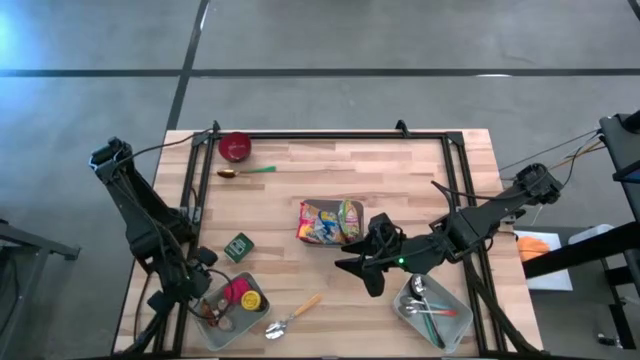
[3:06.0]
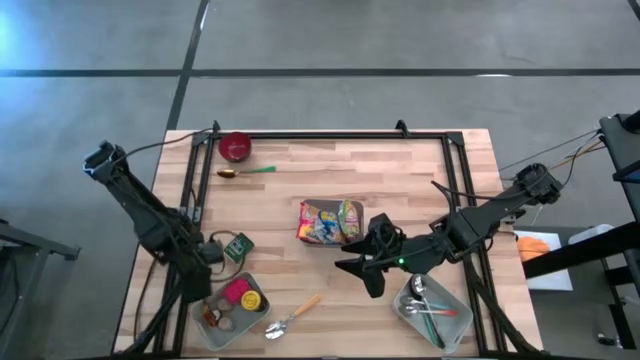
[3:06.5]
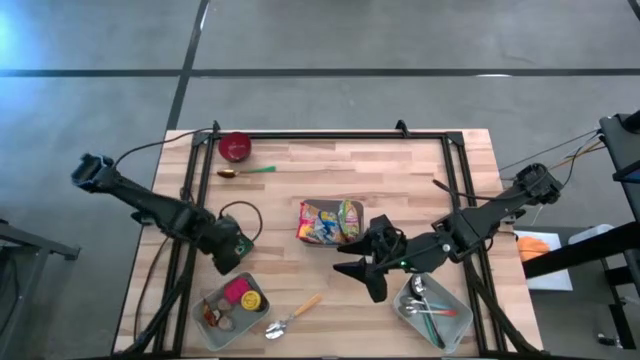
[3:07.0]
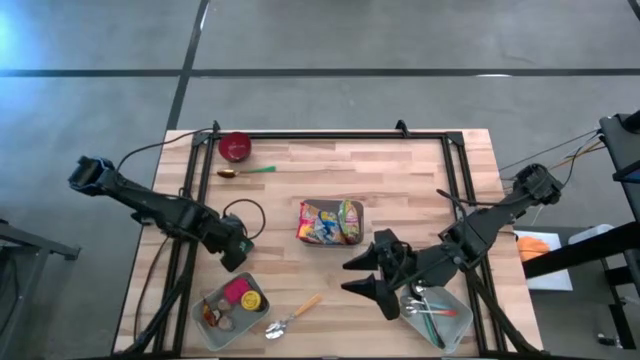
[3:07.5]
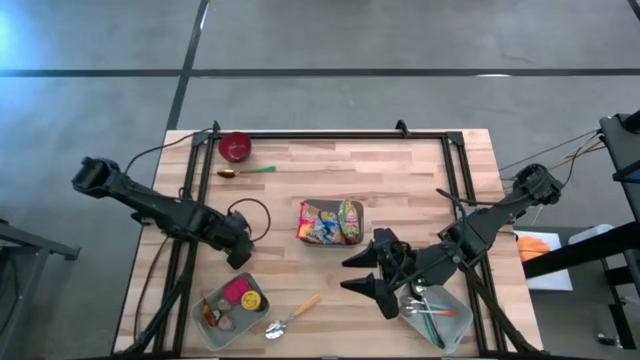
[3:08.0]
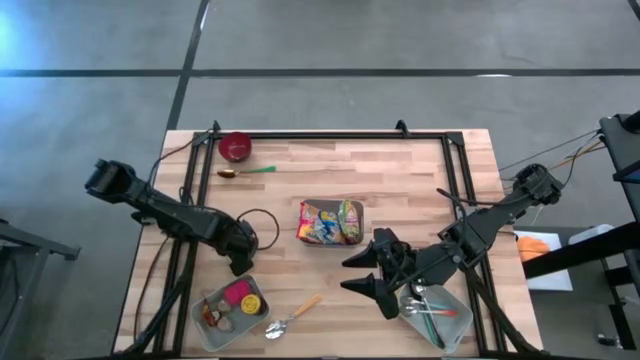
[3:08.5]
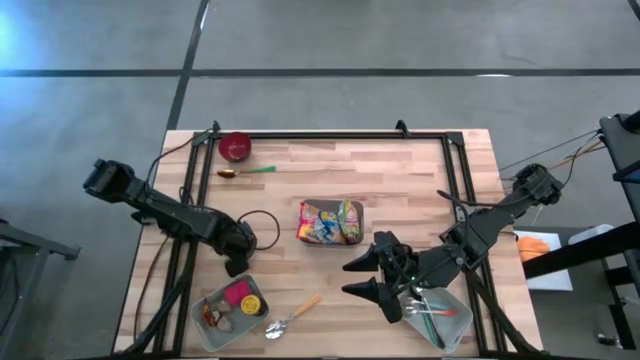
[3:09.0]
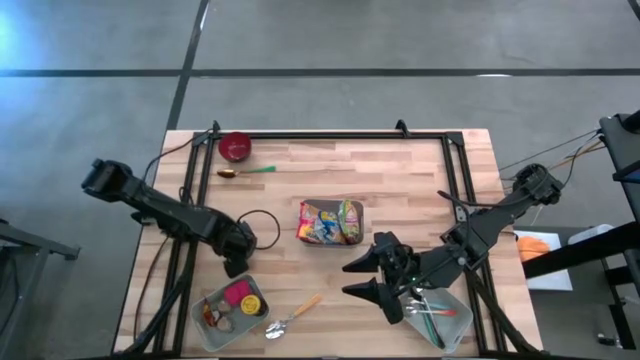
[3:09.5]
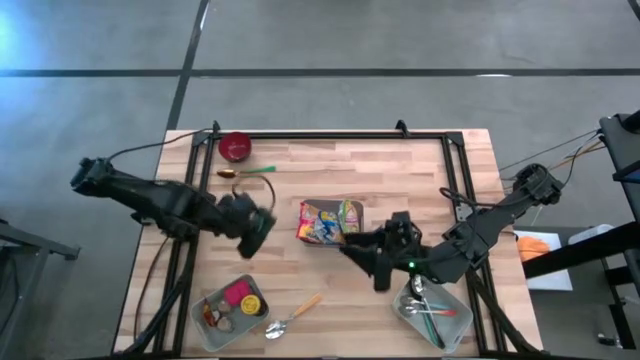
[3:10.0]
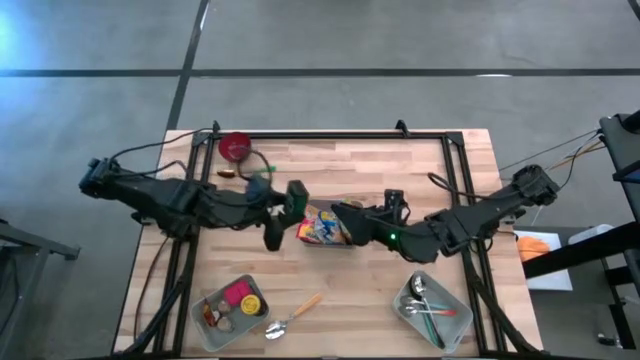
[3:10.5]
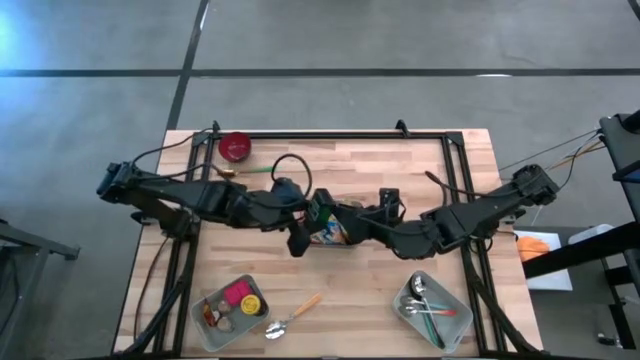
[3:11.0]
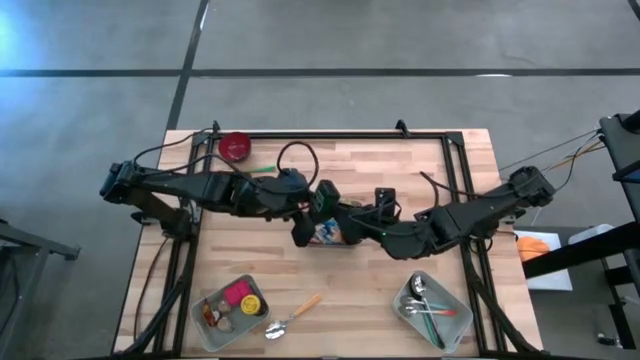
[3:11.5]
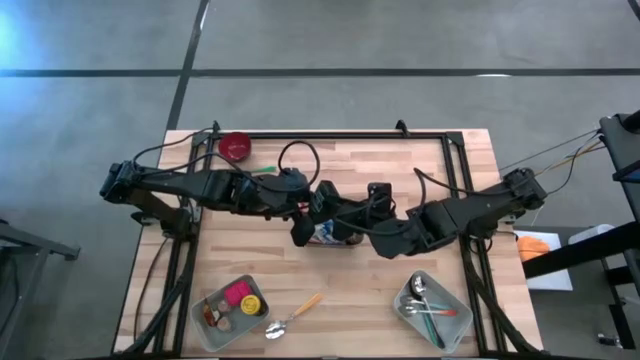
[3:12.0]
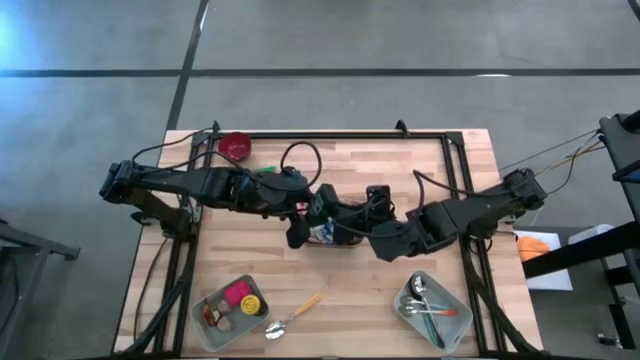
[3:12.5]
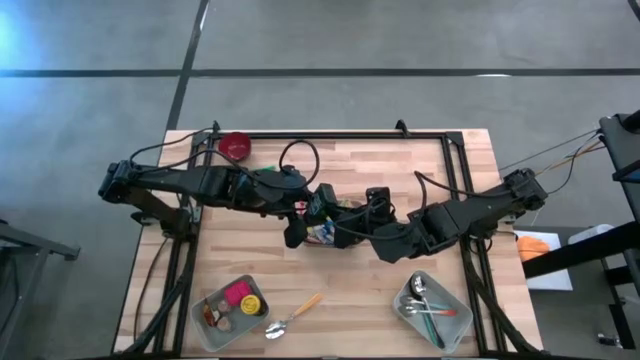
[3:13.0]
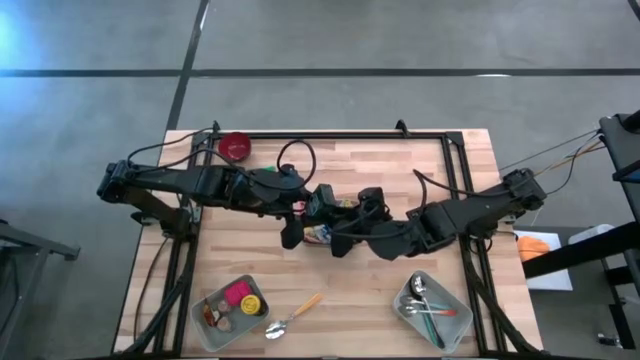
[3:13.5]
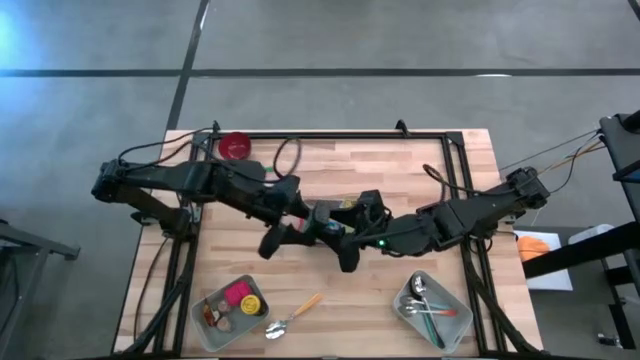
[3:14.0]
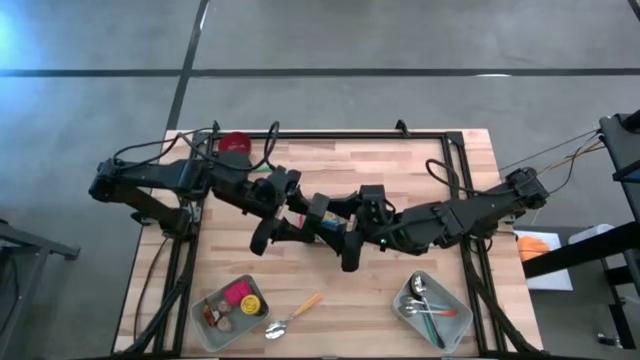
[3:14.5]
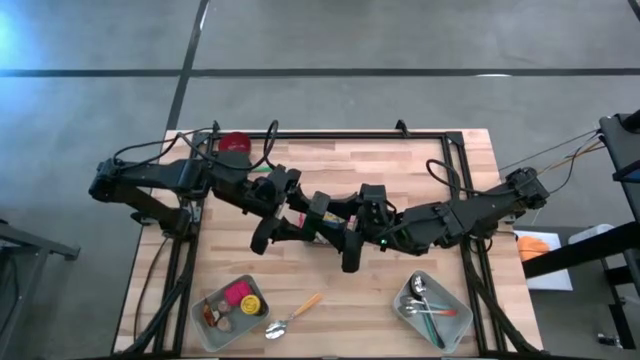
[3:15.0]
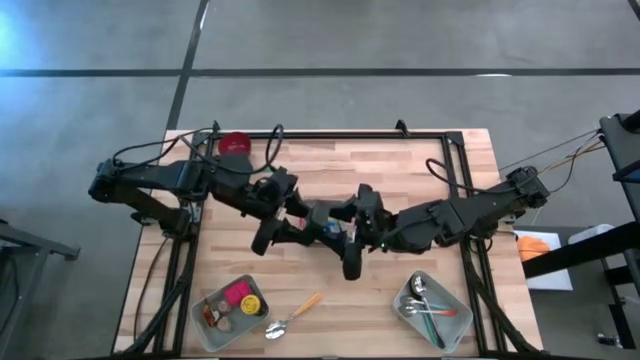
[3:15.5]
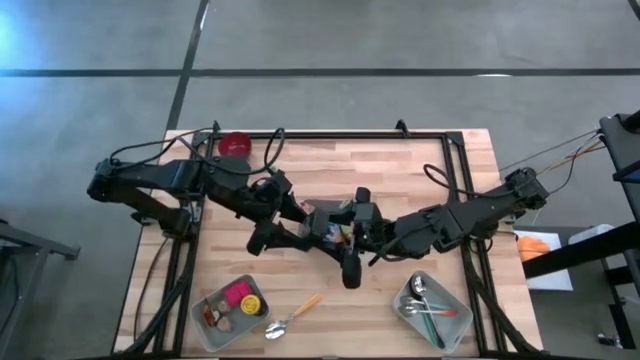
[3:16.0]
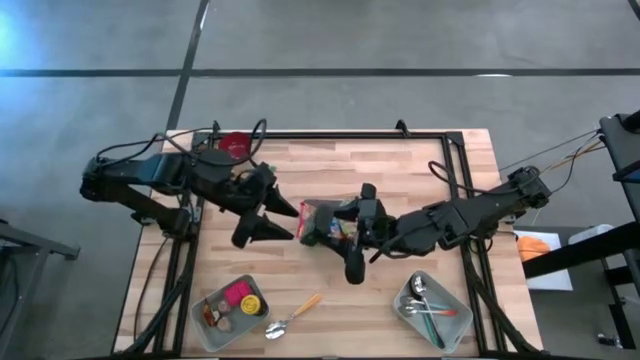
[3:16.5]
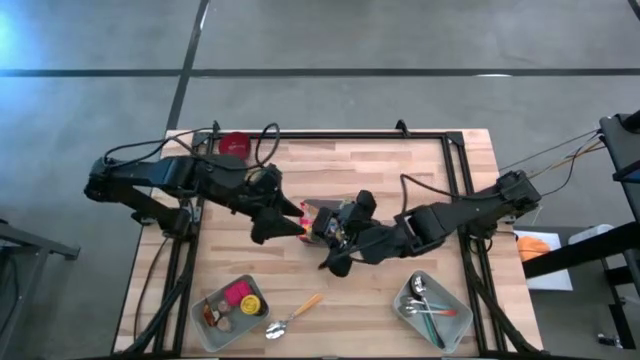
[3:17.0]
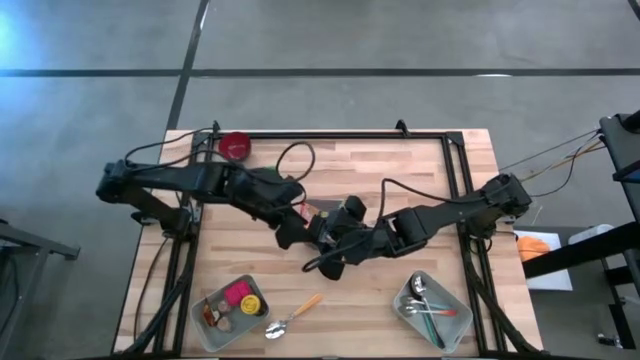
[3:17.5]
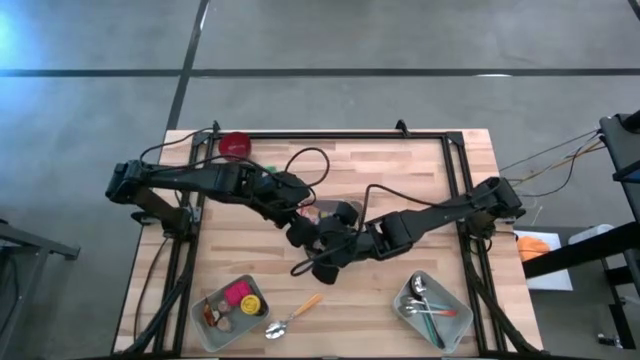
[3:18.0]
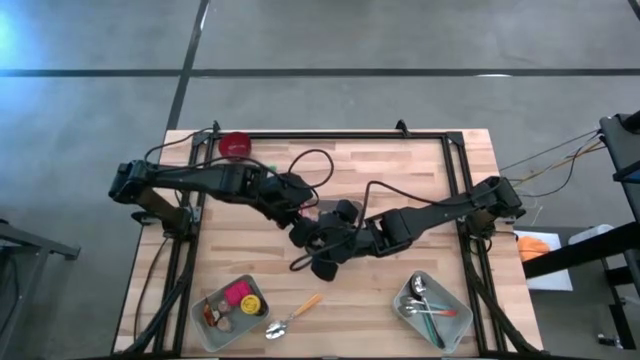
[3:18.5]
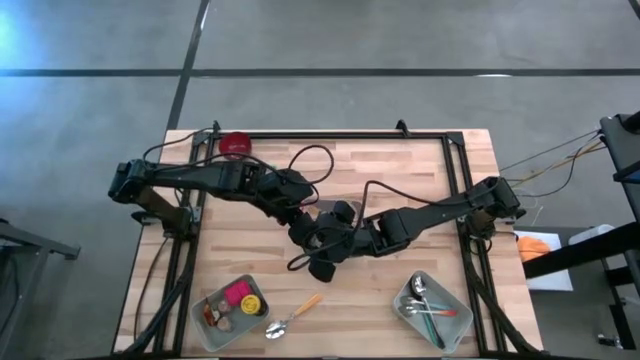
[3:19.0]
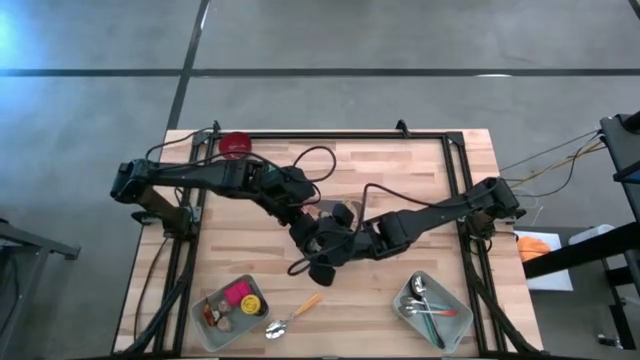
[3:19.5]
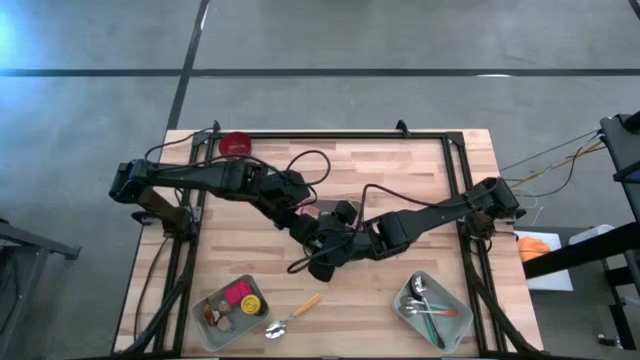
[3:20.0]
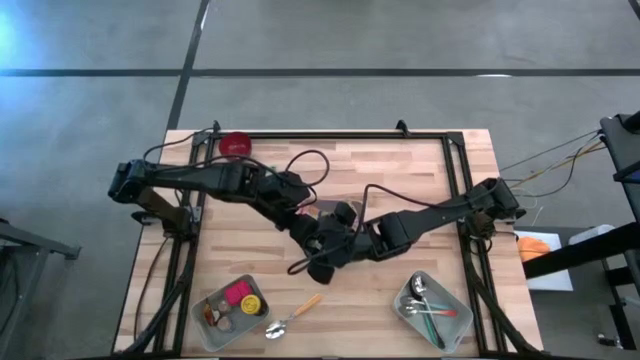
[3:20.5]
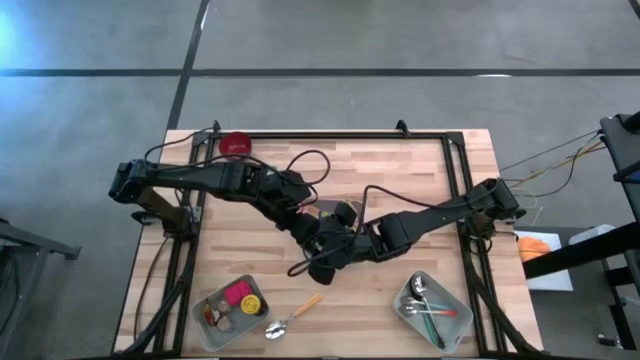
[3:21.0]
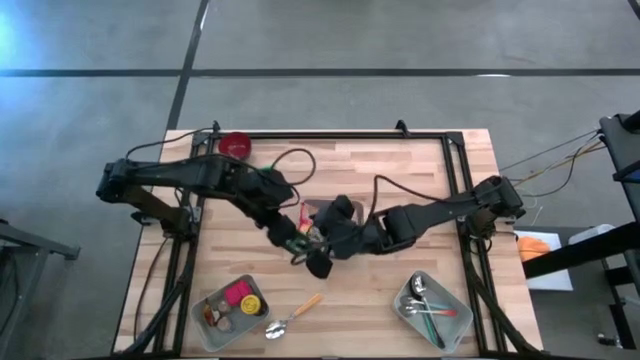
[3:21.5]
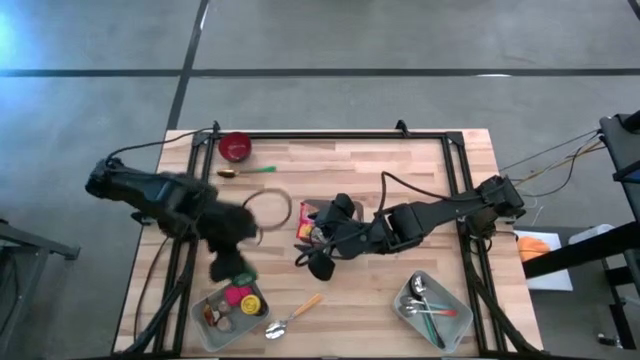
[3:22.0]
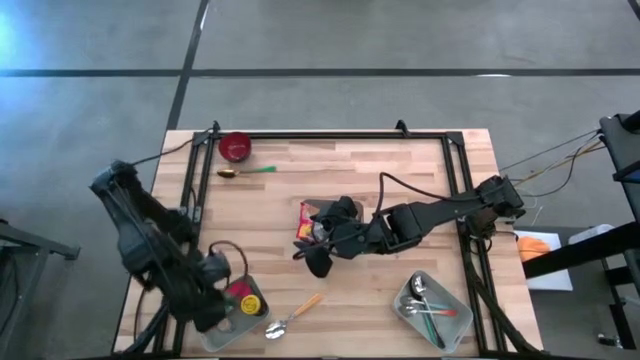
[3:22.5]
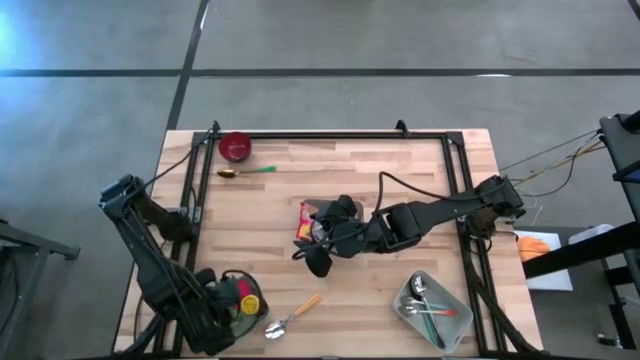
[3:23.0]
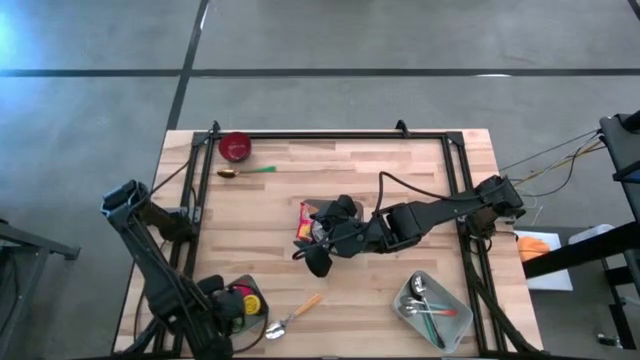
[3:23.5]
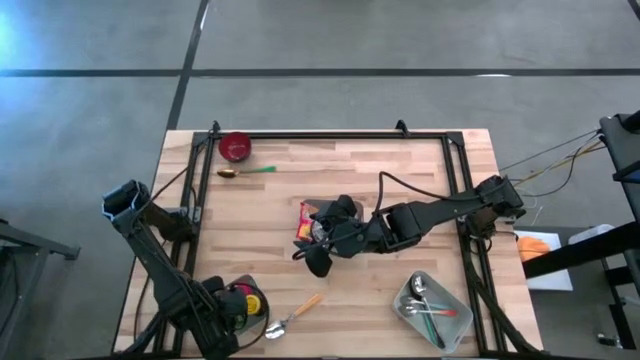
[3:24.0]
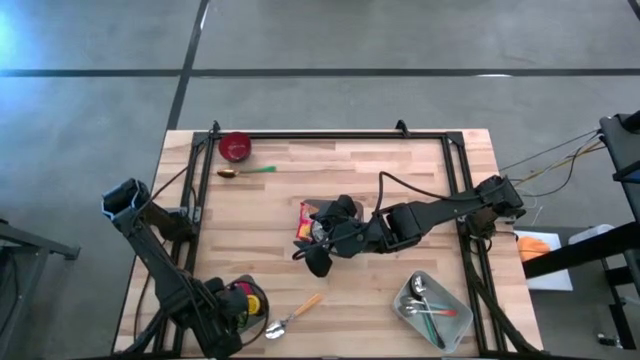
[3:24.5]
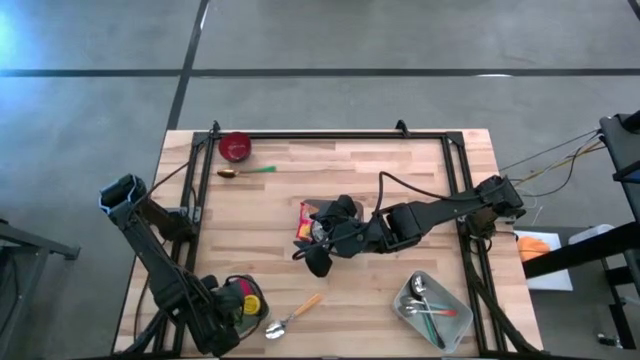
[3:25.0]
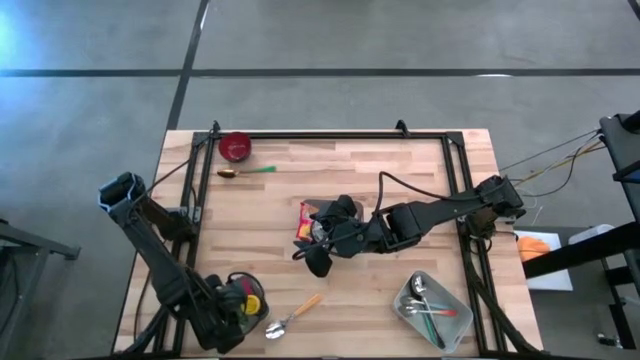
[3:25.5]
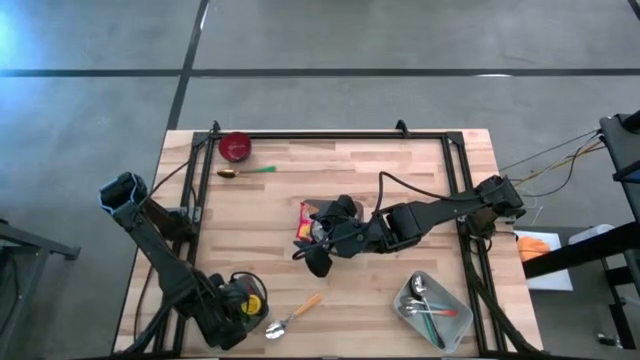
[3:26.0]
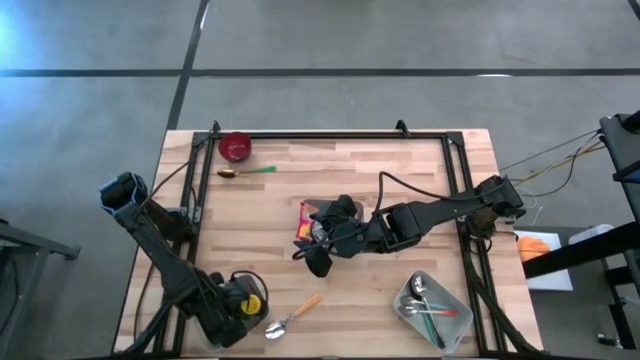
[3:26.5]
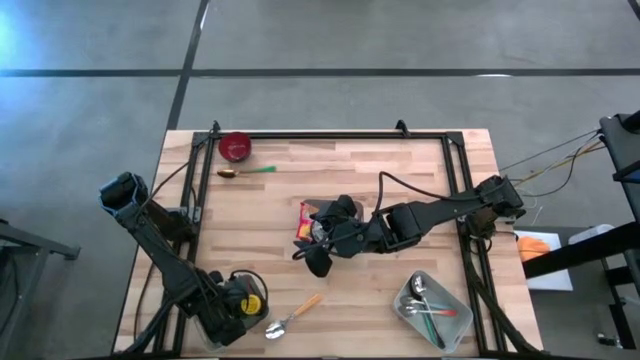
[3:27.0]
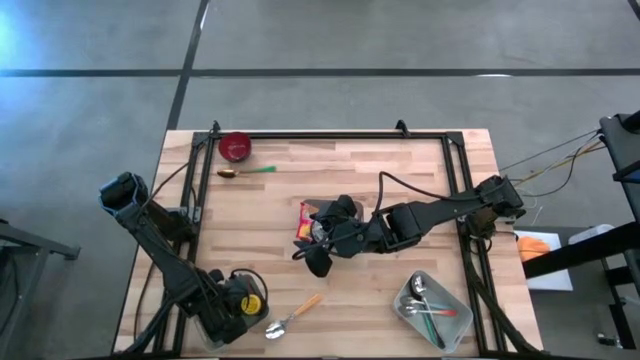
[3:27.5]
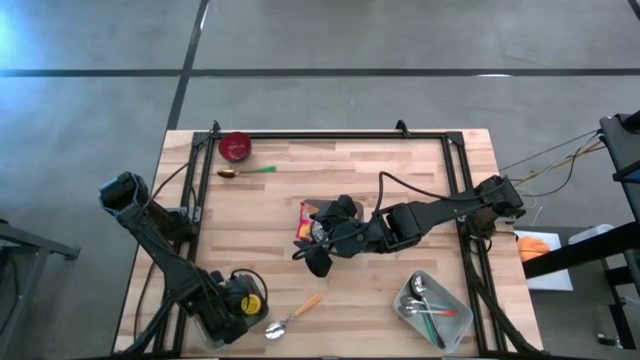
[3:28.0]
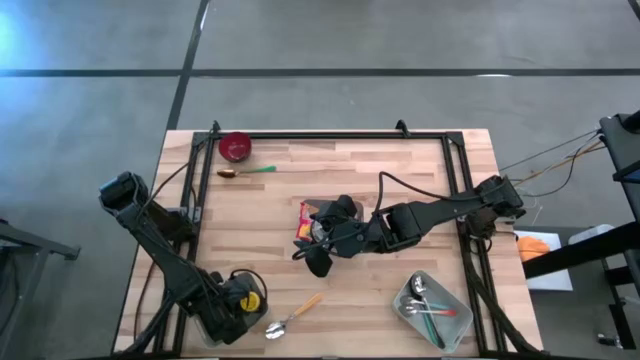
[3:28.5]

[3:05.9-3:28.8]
Put the black spice can into the left grey bin
